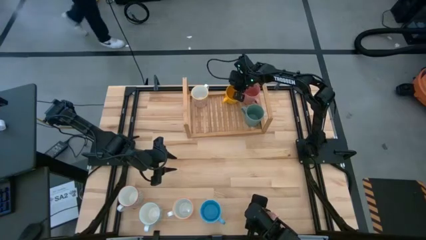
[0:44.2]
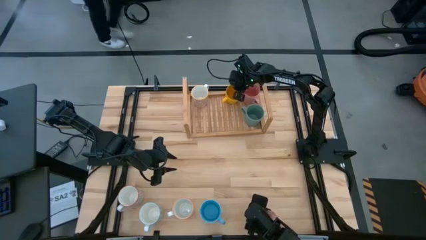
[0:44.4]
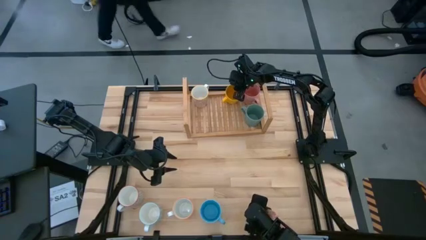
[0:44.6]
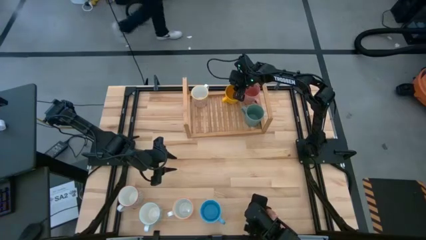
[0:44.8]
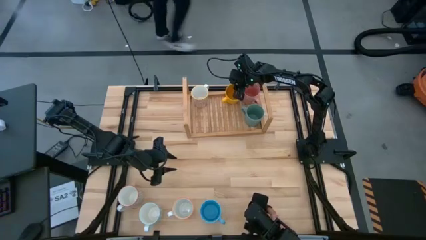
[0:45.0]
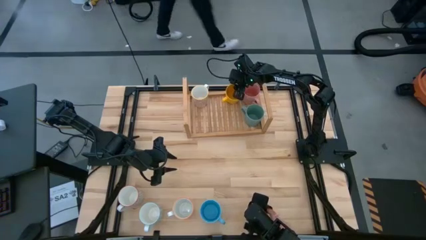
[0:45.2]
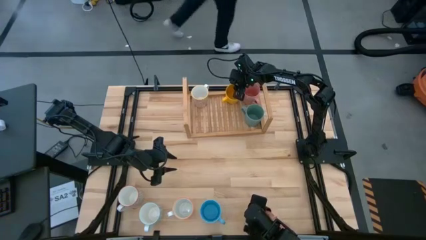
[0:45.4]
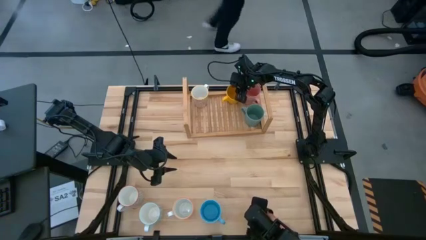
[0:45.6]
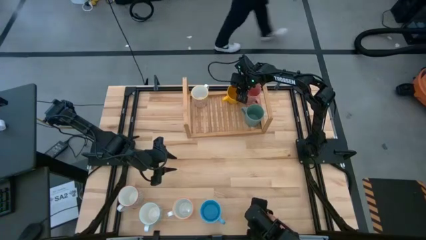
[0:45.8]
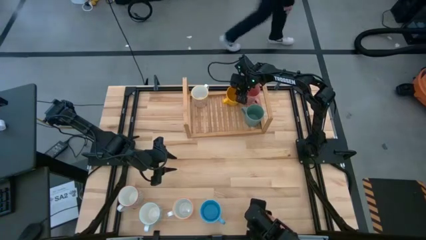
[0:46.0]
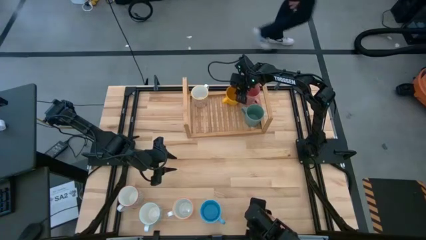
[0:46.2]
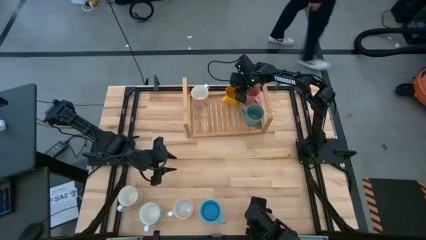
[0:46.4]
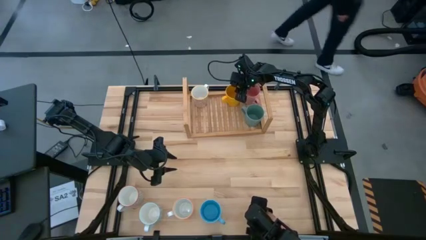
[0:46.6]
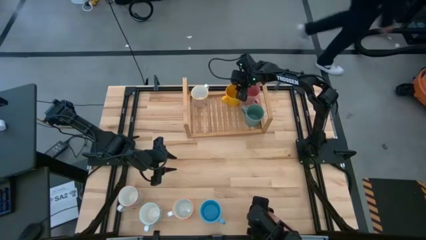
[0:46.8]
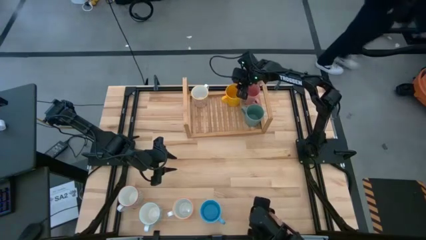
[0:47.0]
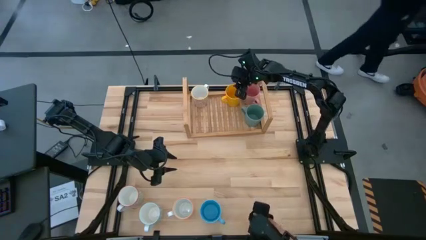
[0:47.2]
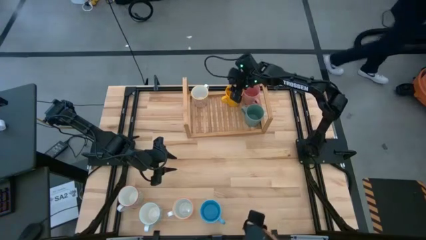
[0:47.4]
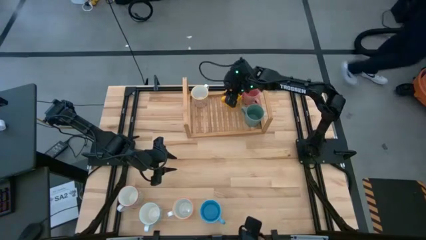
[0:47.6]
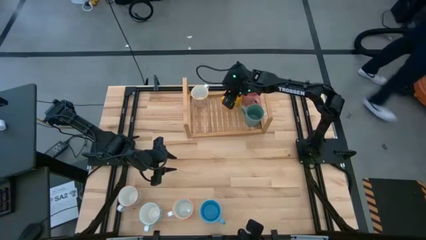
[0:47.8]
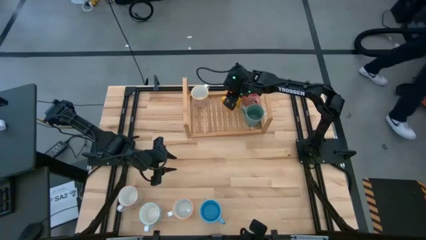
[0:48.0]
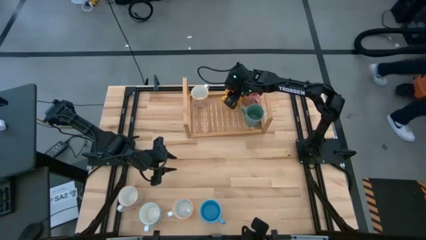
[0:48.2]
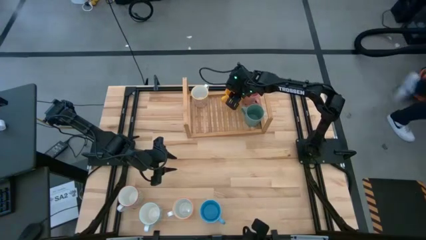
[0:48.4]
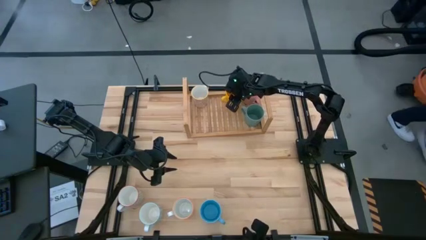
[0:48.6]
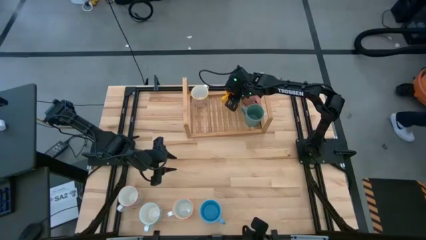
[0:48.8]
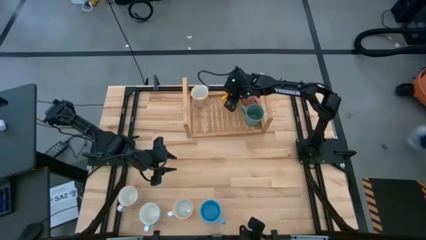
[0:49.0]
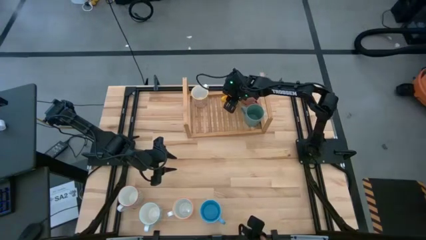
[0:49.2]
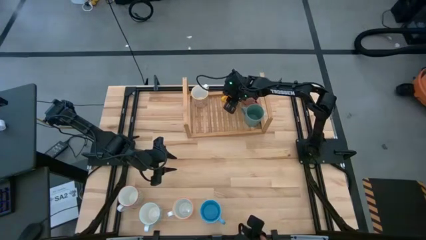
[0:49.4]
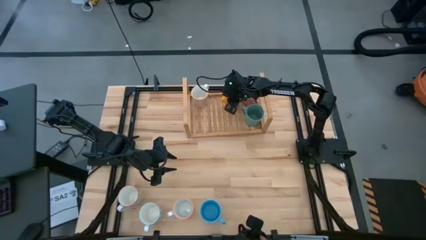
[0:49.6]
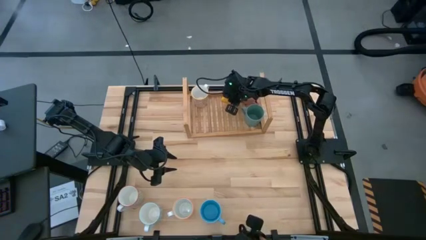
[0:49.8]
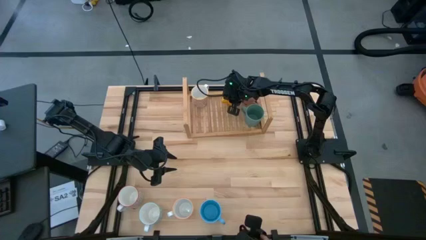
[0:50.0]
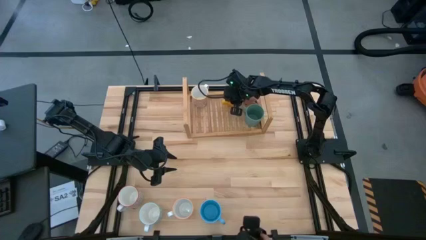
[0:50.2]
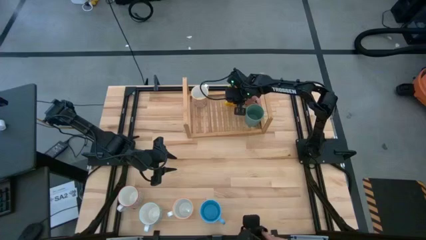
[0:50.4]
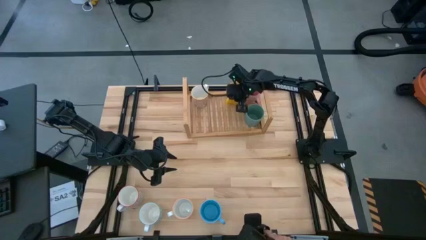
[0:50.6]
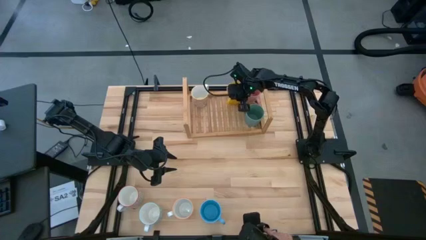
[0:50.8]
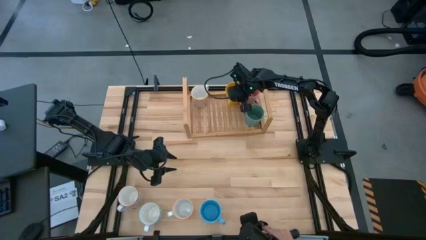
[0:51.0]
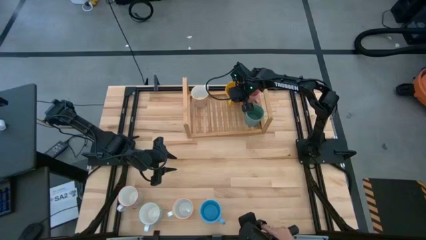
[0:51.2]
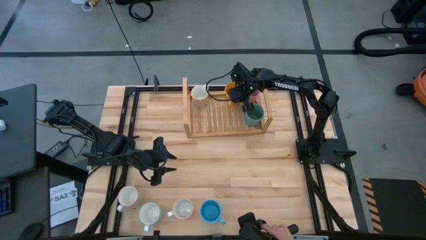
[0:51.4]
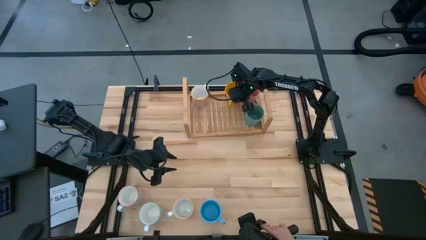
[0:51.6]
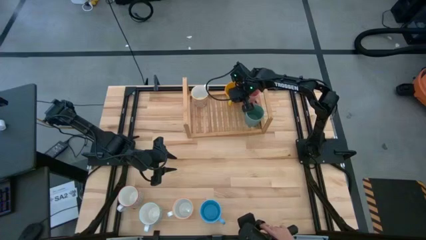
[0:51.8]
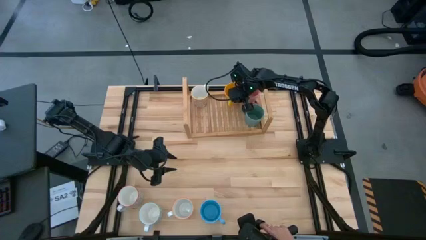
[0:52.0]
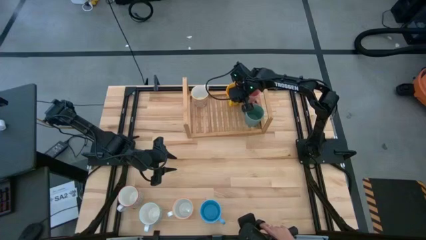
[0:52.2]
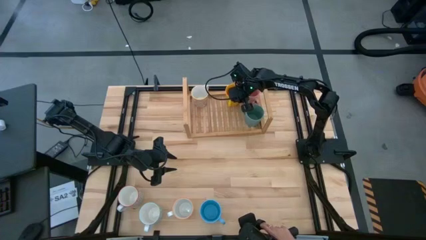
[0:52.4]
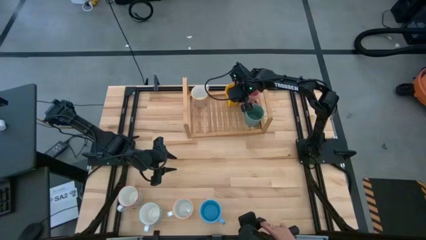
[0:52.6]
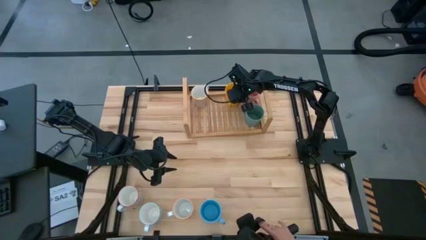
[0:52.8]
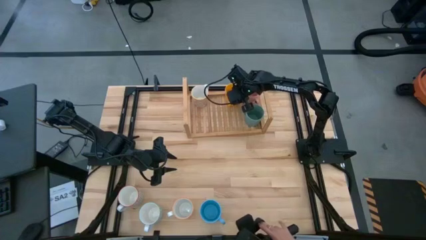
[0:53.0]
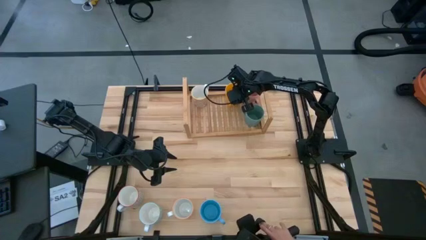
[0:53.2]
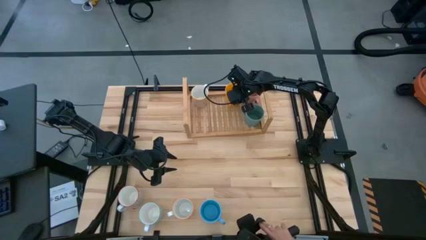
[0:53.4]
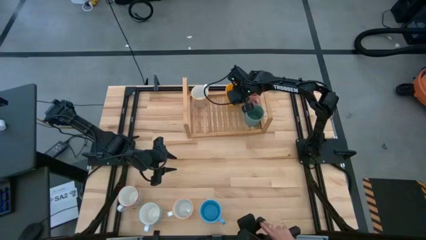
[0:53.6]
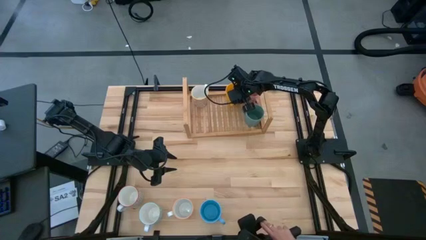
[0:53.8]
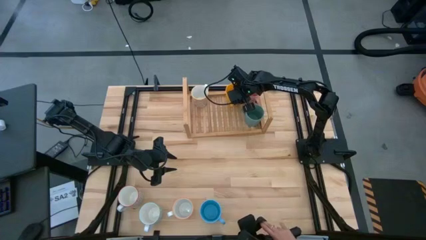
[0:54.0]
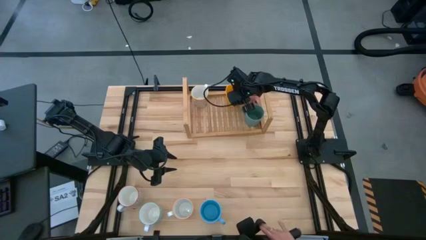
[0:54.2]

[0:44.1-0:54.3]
Task: Place coffee mugs
Put the yellow mug on the shelf

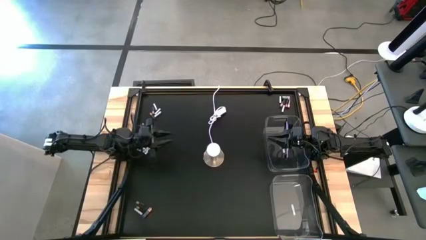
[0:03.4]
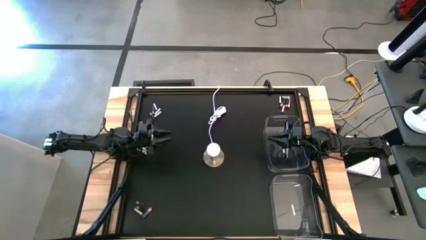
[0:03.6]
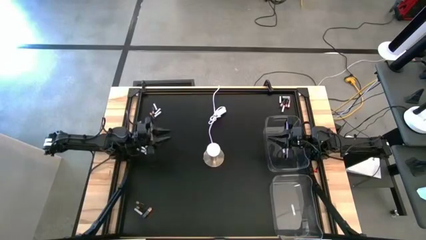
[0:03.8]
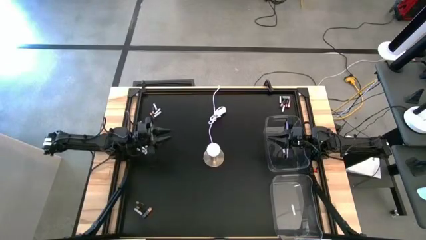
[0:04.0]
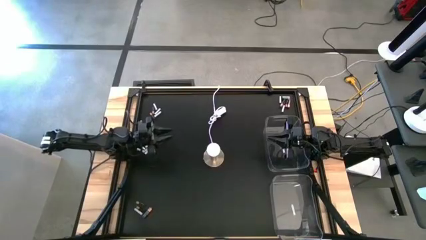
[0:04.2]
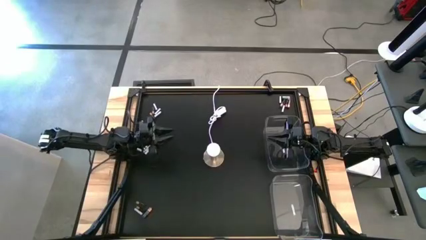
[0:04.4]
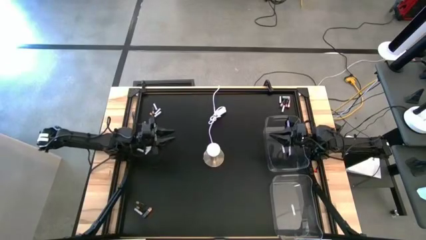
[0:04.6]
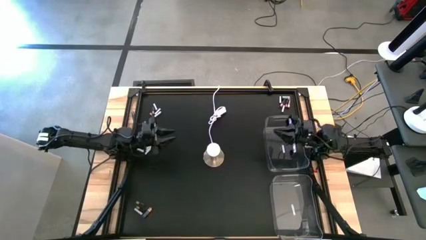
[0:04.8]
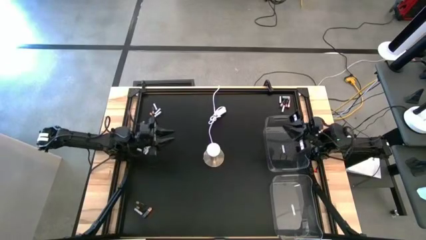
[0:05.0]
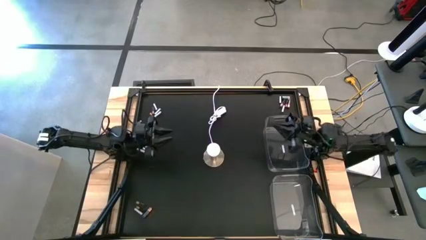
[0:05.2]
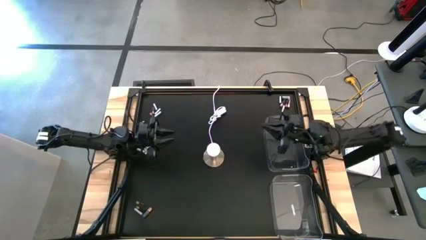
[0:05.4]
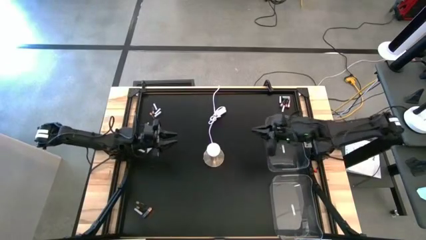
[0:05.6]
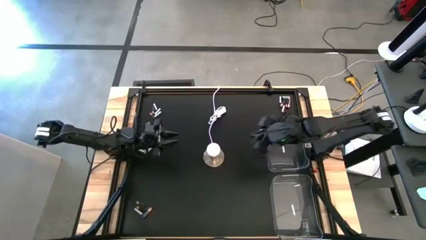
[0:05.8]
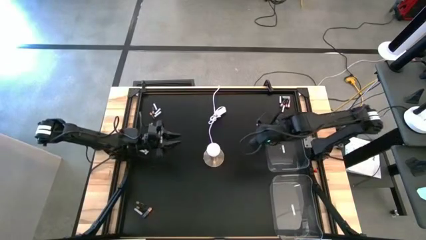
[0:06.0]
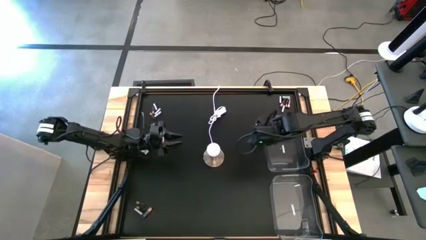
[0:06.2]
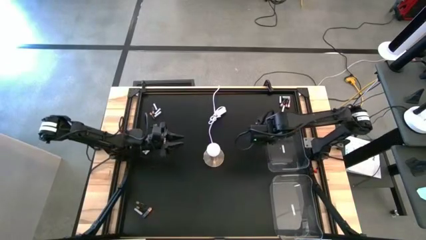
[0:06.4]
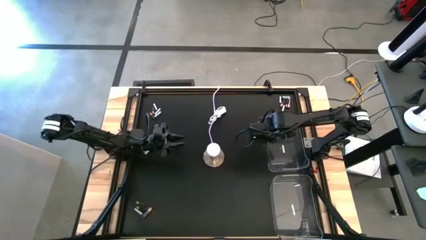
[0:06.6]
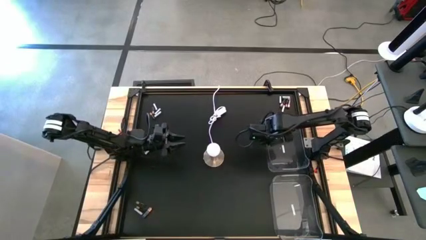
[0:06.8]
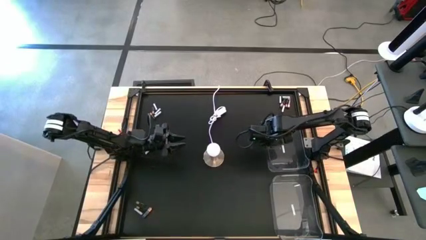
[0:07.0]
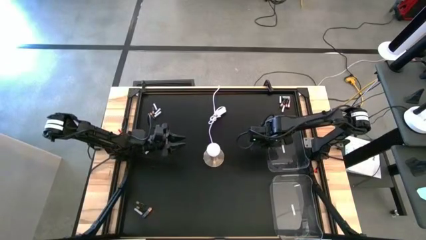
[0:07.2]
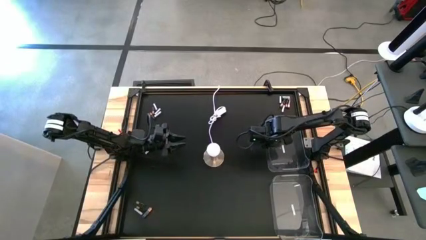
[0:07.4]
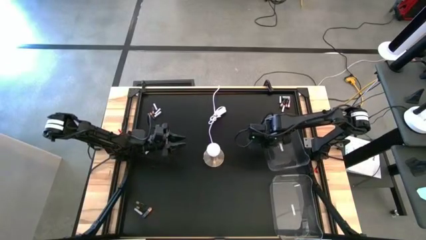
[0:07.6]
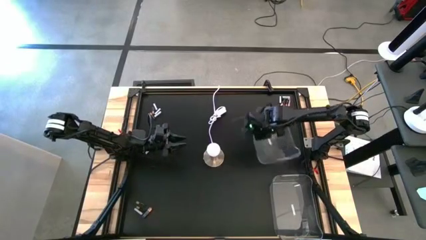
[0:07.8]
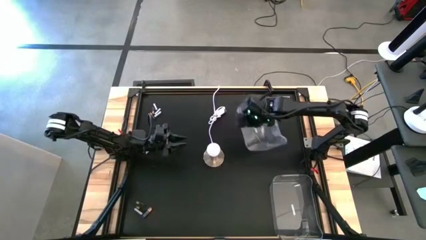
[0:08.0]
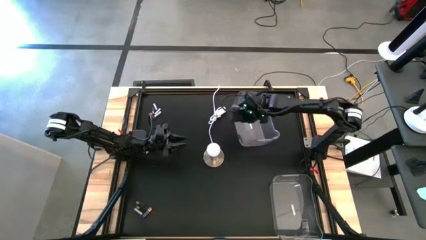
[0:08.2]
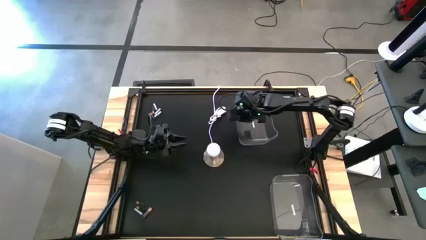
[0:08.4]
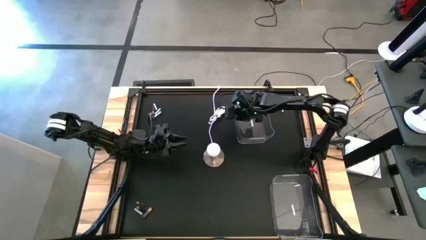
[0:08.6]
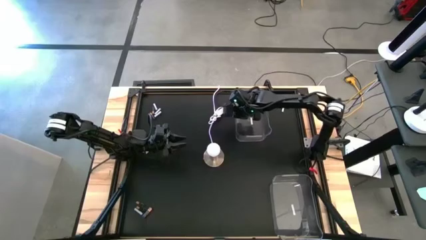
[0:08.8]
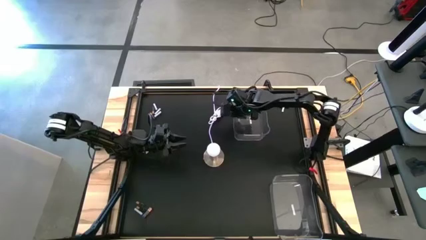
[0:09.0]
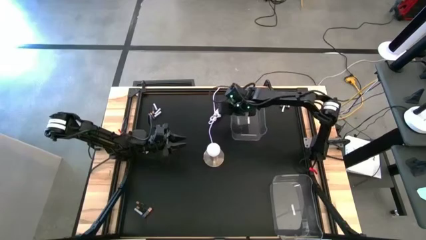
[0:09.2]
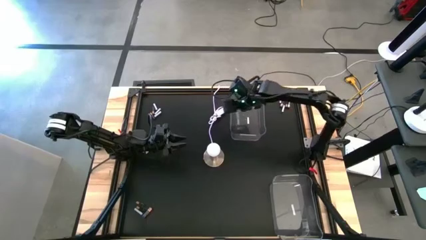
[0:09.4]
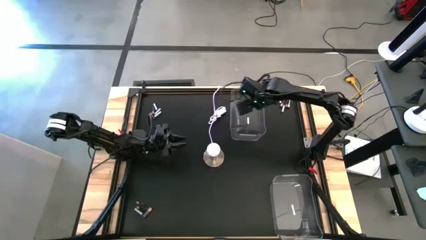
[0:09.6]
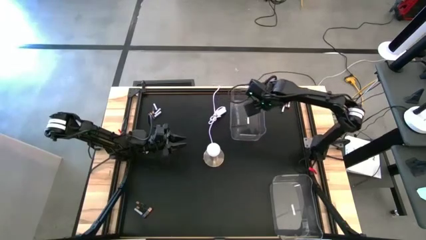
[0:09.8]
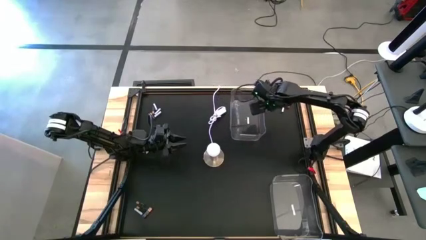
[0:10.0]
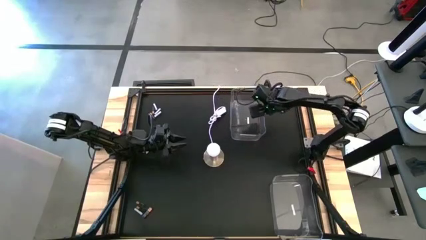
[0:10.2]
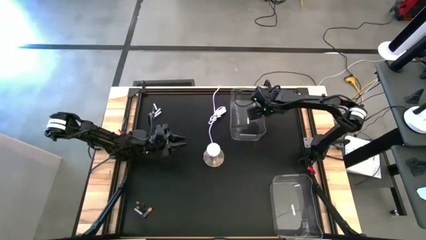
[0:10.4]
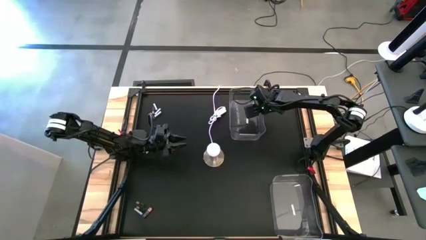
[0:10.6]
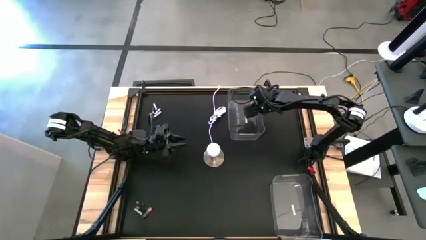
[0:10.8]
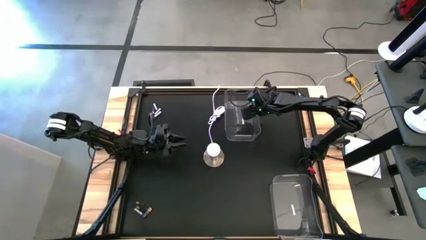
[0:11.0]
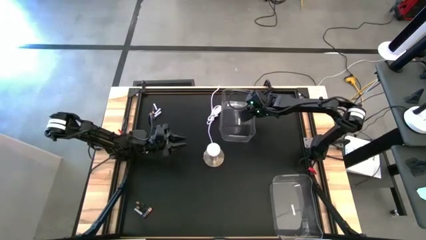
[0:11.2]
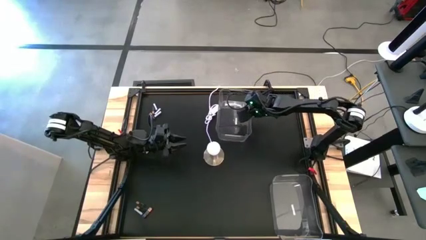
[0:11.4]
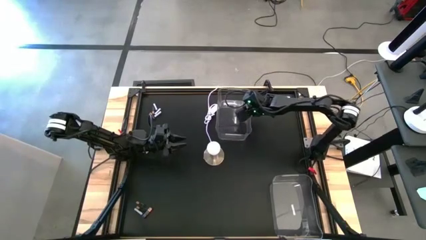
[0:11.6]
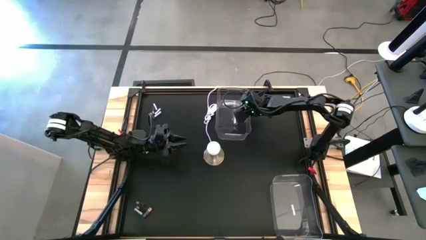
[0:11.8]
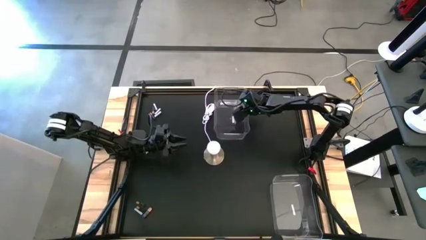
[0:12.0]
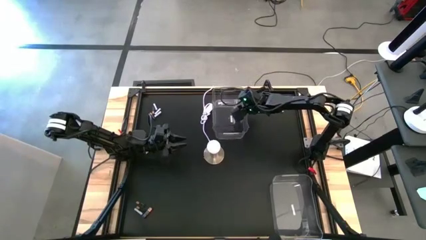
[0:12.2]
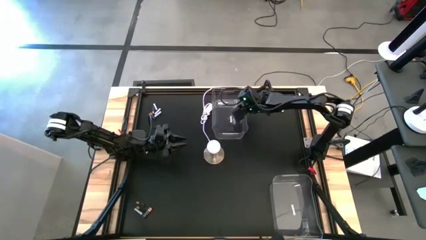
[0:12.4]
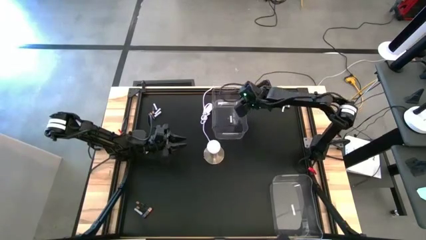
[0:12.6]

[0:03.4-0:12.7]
Task: Sort batteries
Move the top transparent bin to the top left
